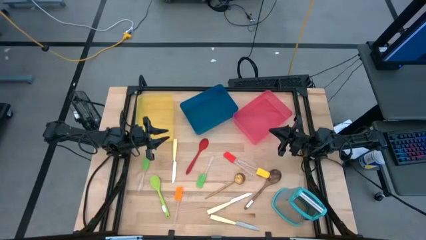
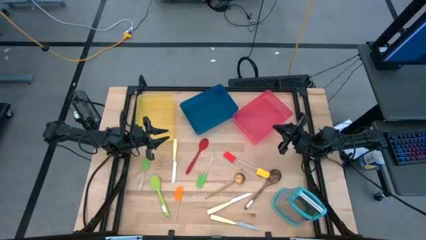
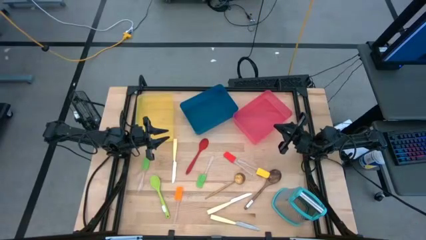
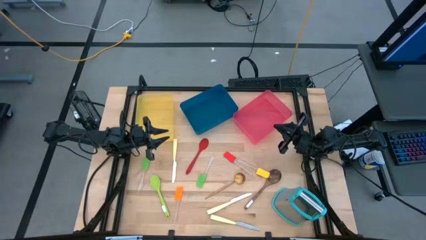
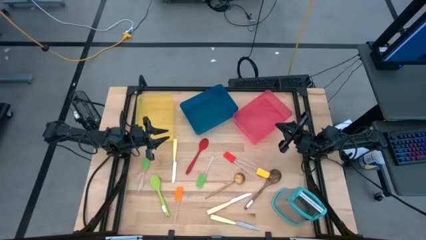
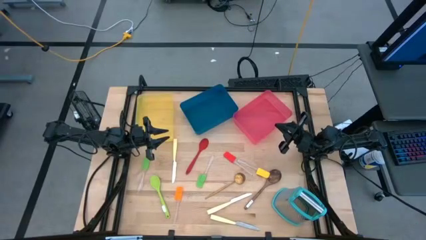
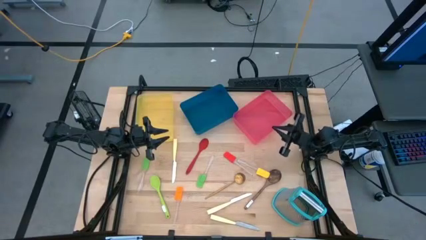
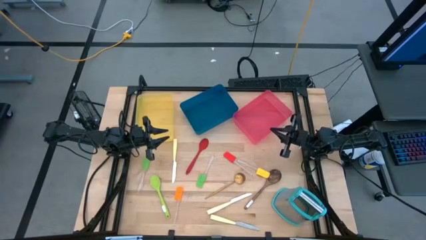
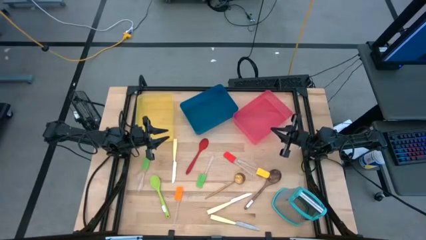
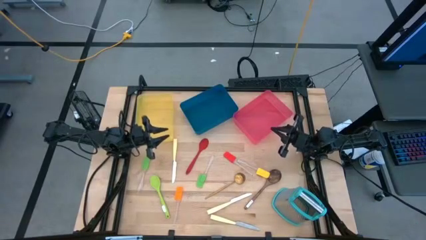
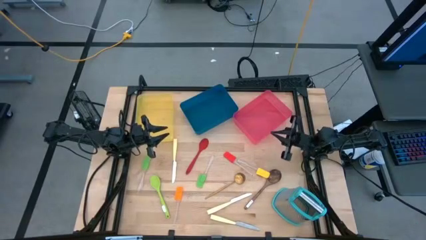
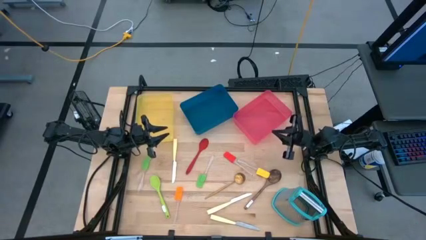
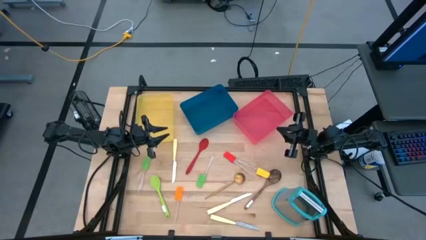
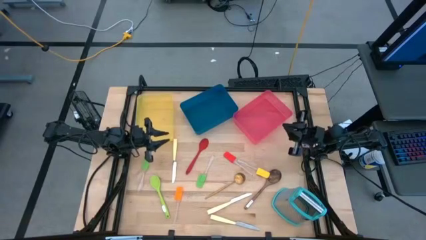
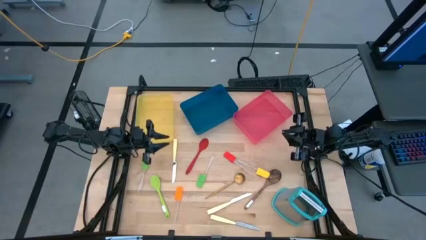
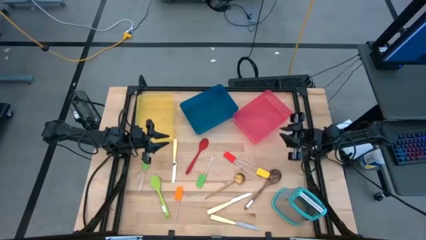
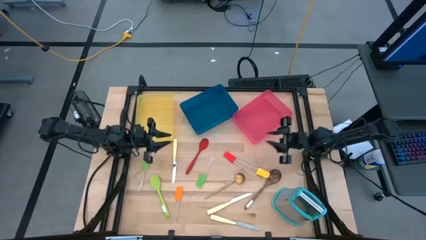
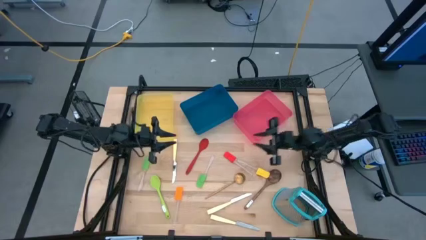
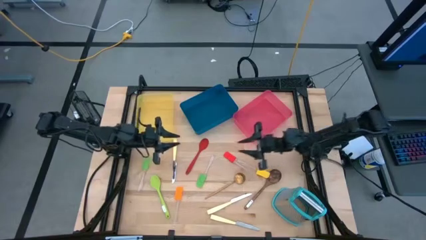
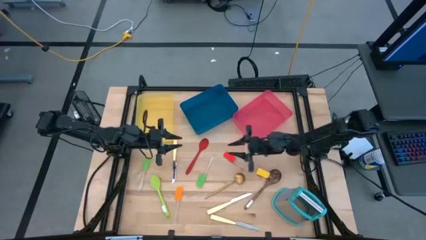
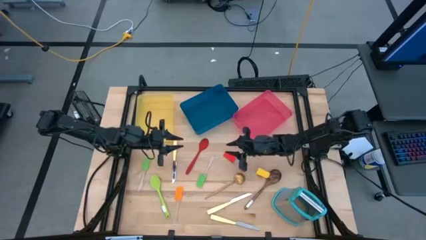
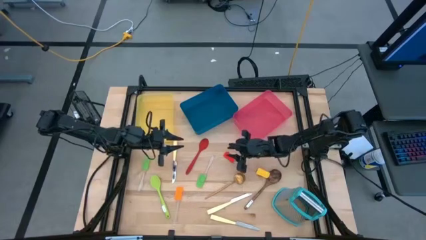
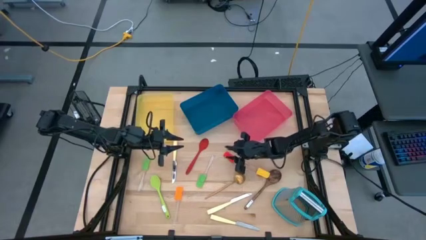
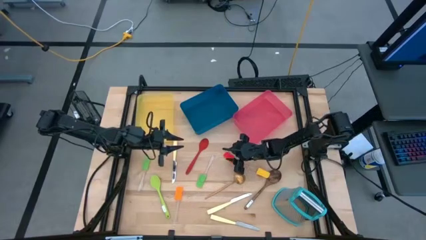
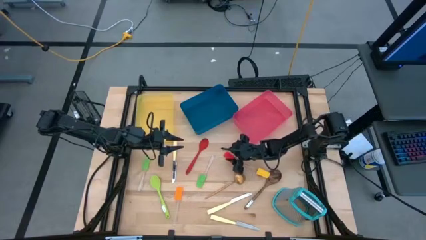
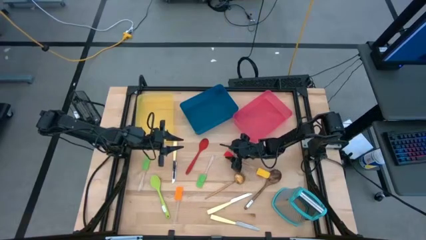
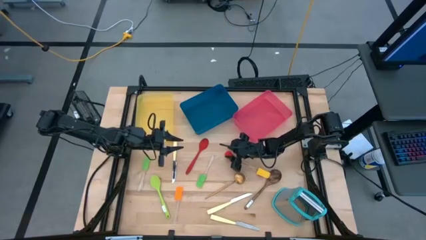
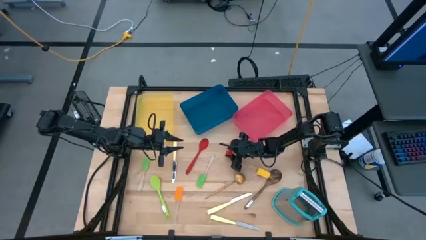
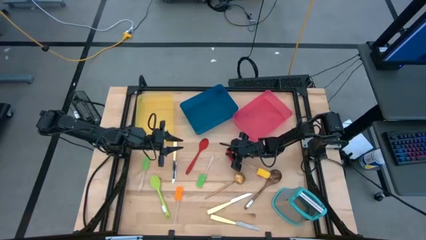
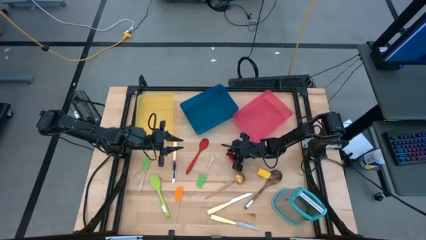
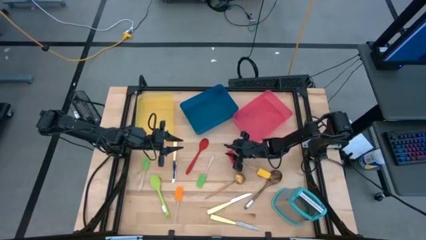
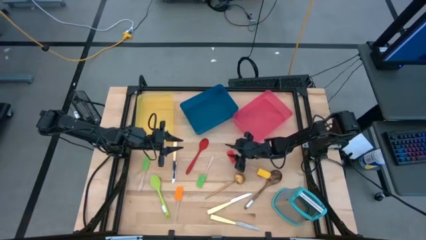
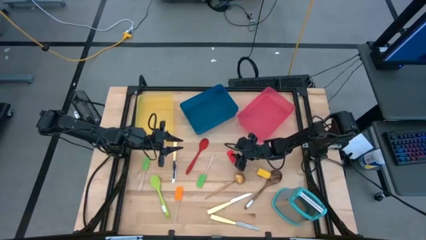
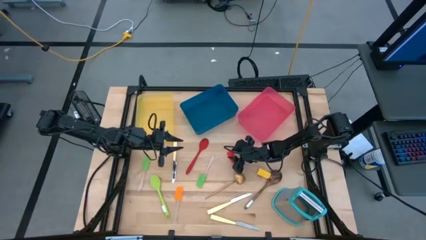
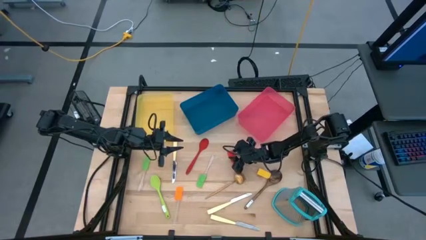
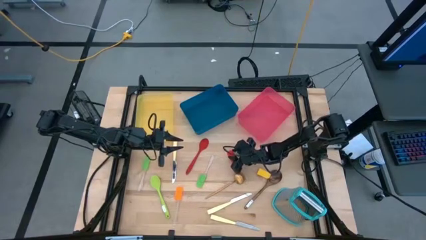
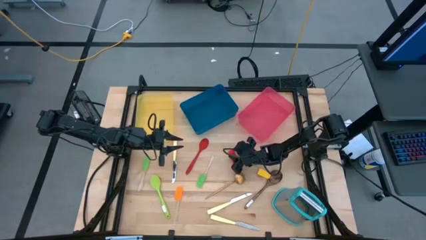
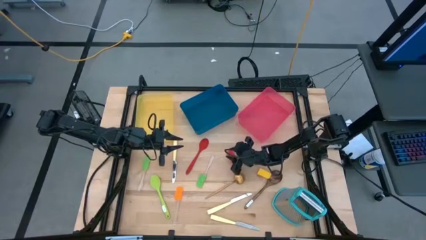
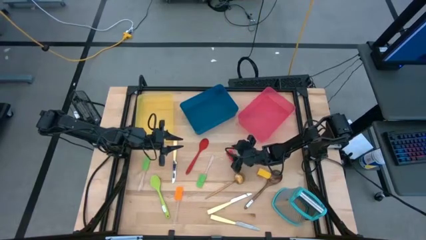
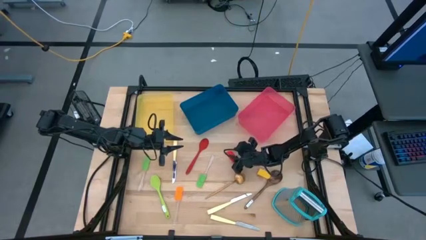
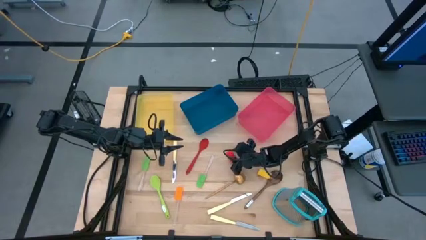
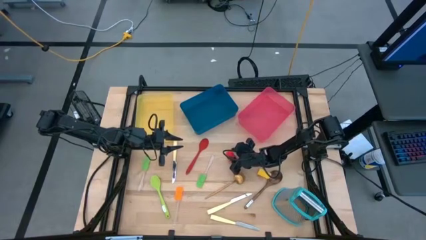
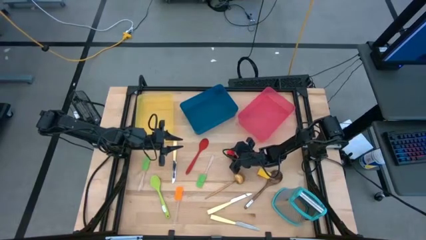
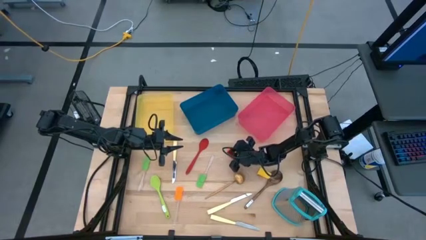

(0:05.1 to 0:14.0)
Task: Pick & Place Kitchen Items
Put the red spatula into the red bin

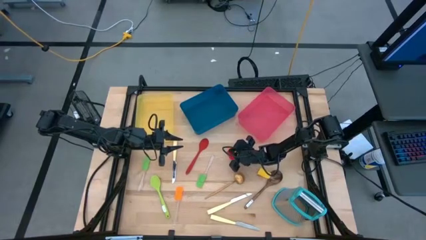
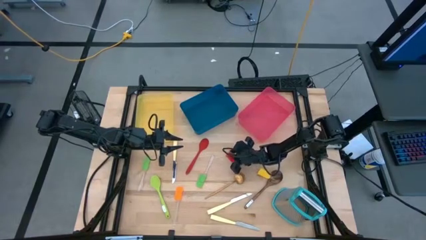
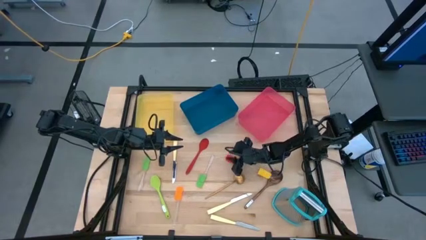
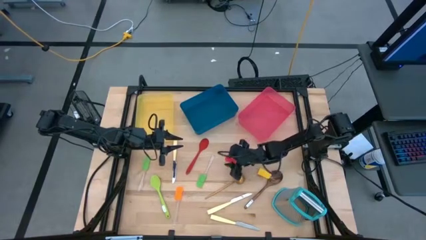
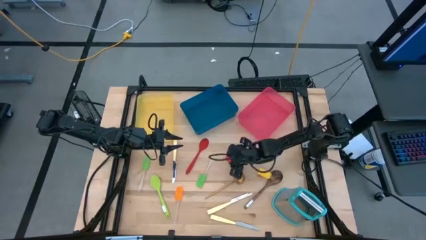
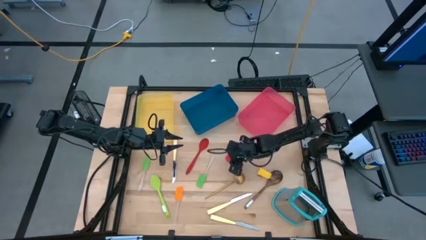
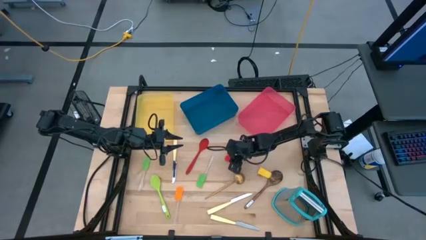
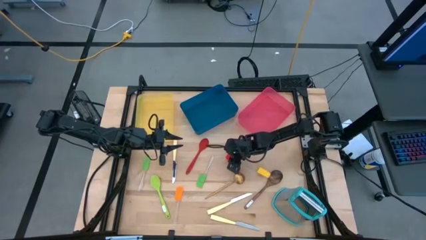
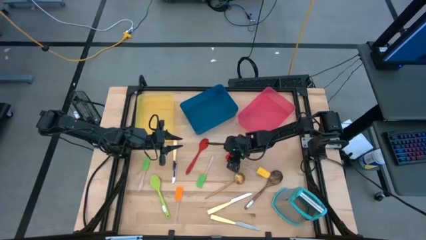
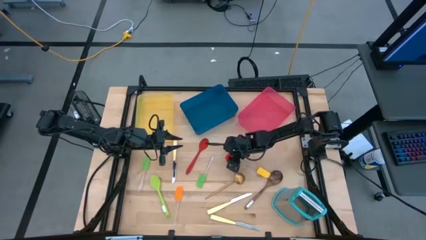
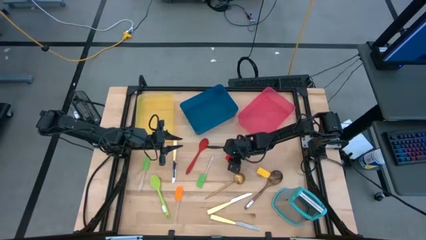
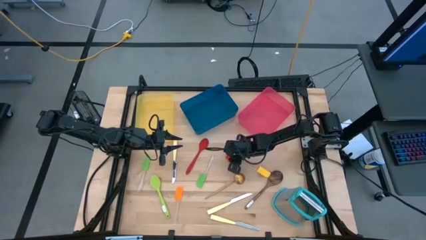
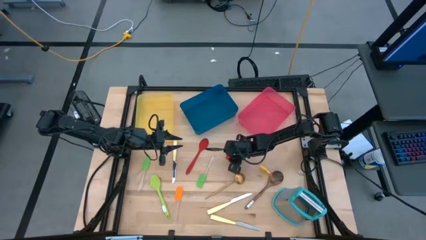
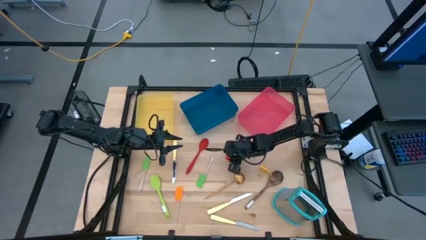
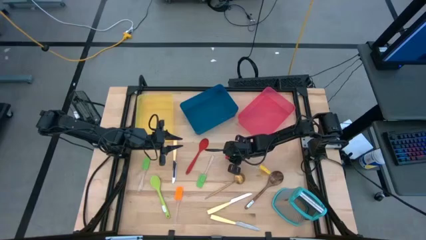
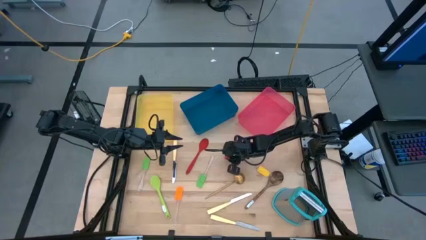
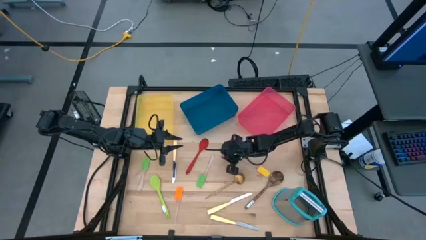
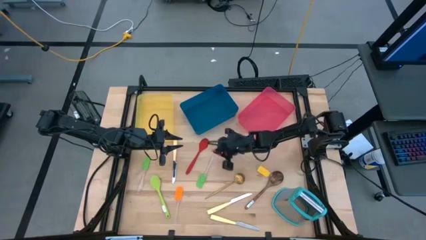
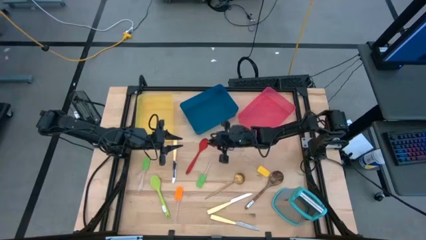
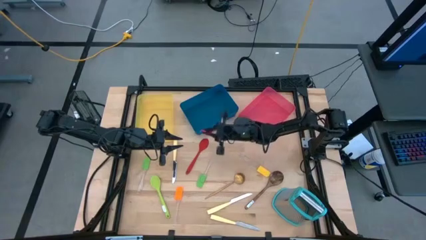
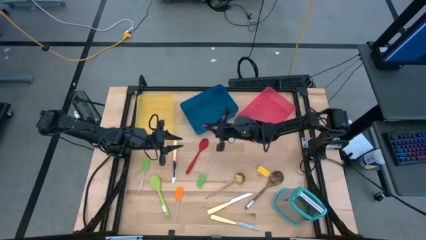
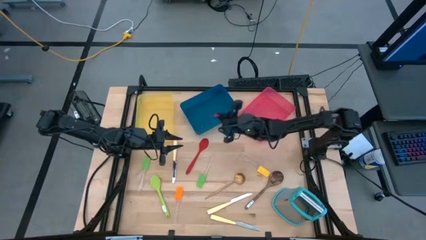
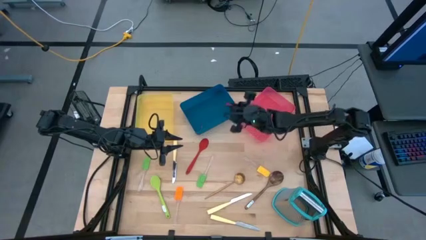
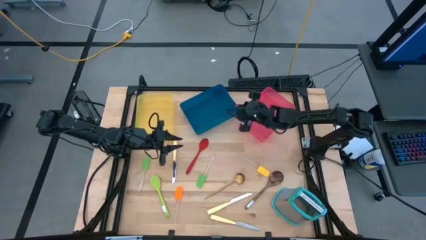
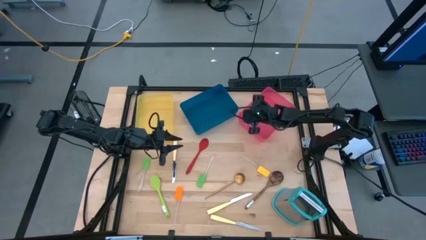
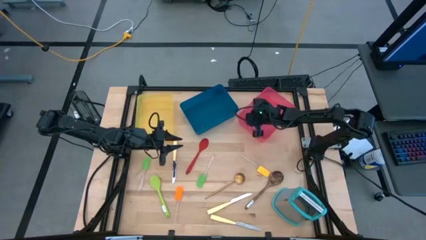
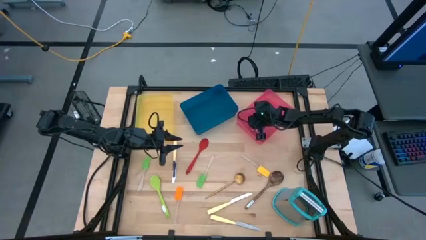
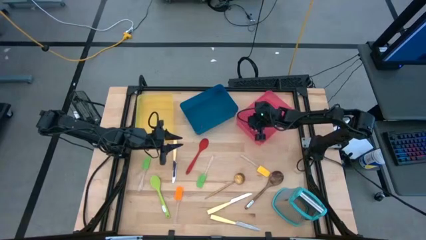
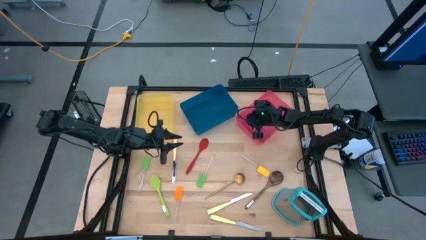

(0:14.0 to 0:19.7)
Put the red spatula into the red bin
